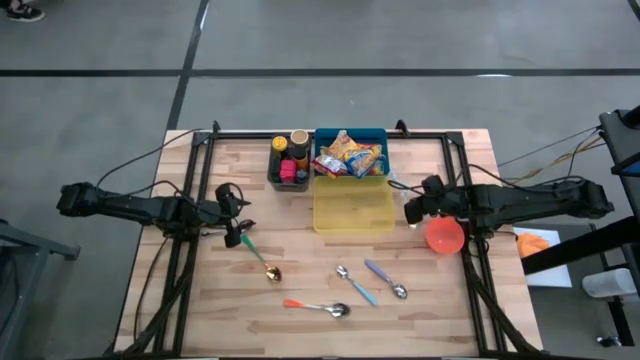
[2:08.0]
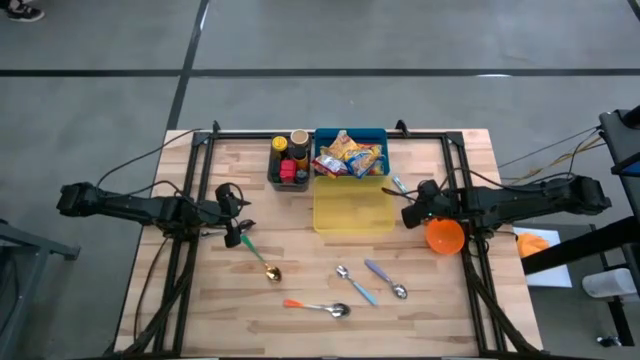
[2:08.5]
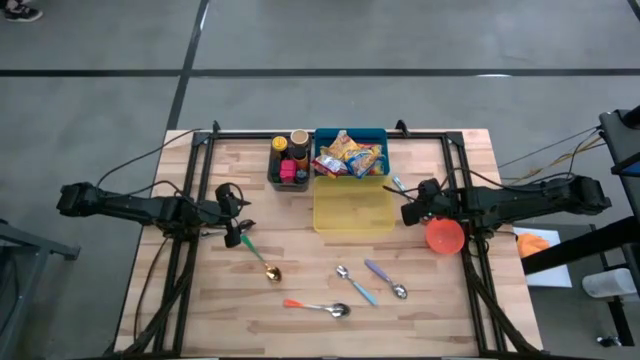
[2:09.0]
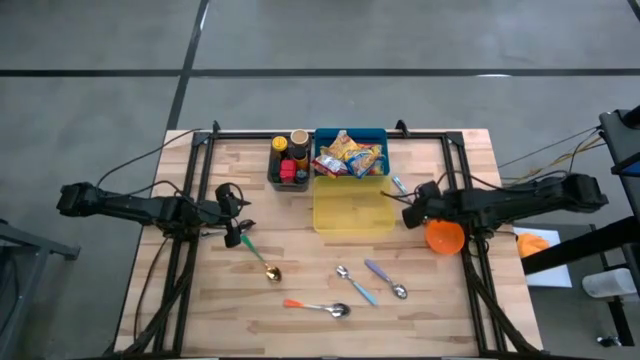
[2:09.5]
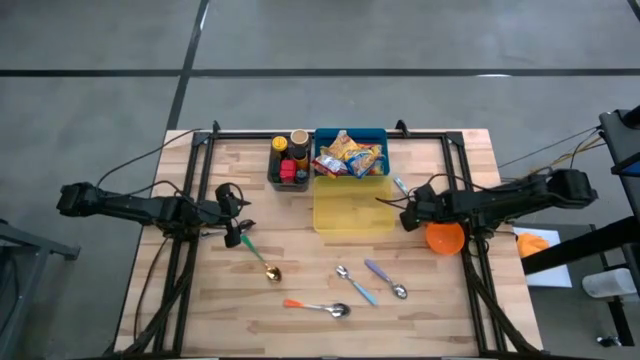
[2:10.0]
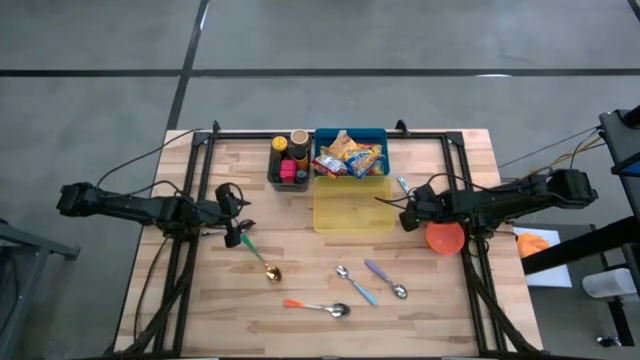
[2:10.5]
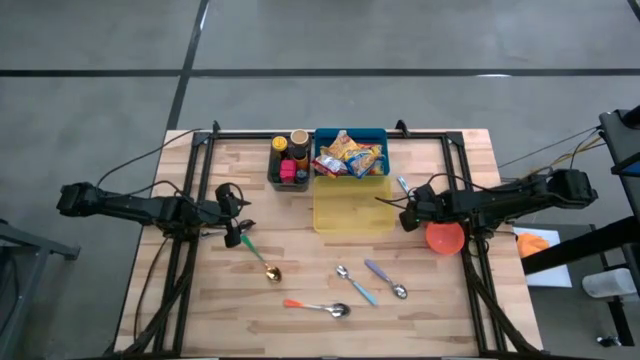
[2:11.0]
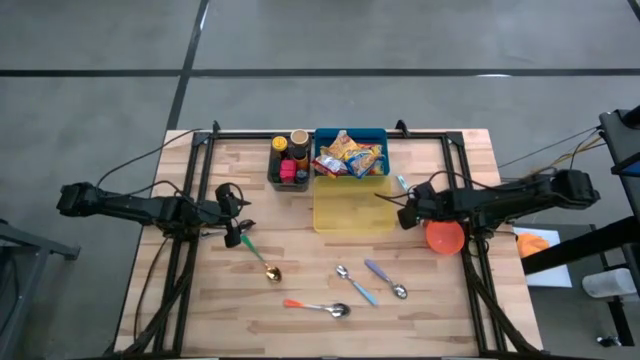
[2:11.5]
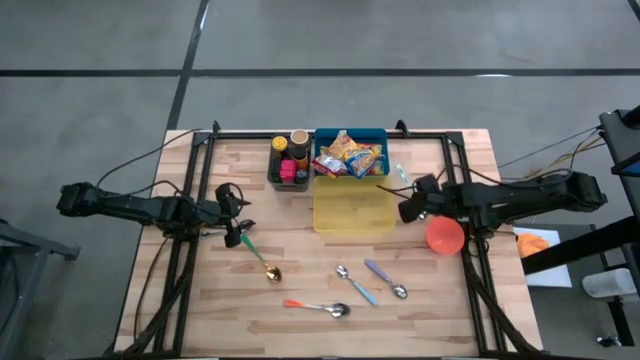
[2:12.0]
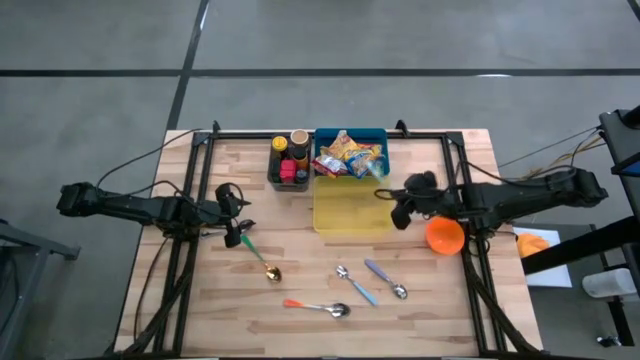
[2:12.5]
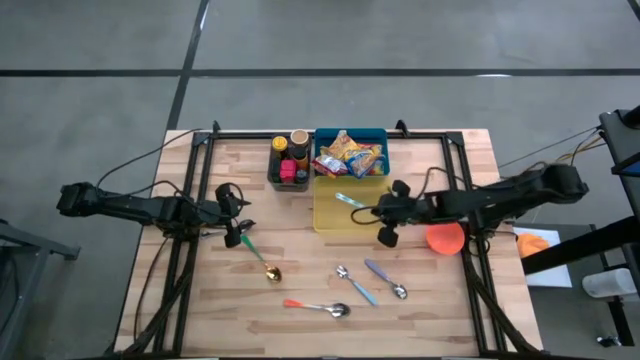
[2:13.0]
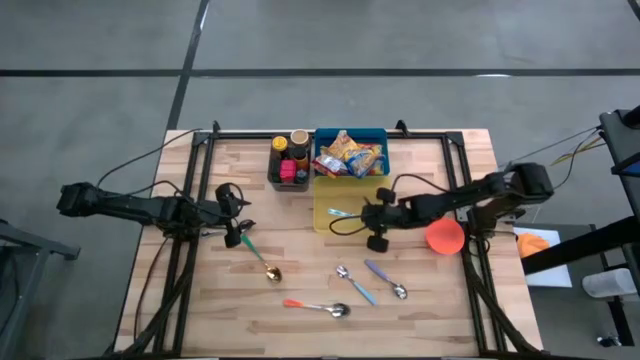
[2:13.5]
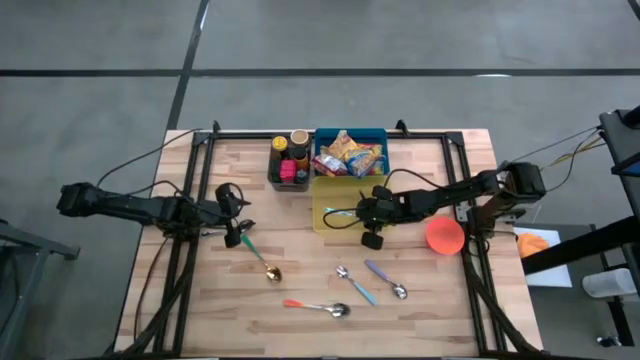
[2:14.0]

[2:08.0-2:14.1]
Put the green patterned spoon into the yellow bin

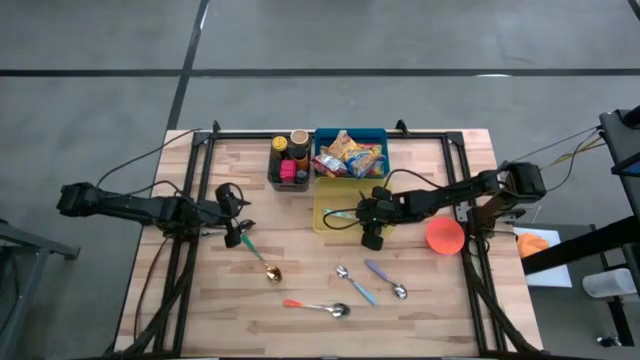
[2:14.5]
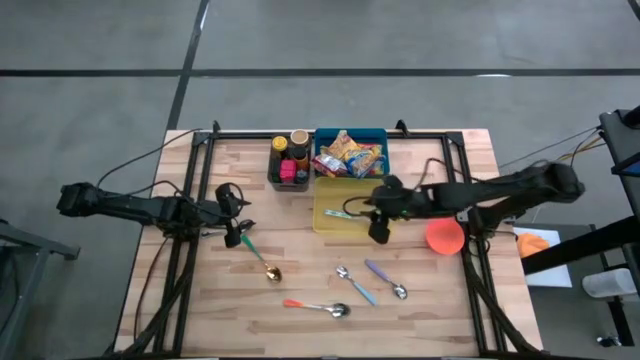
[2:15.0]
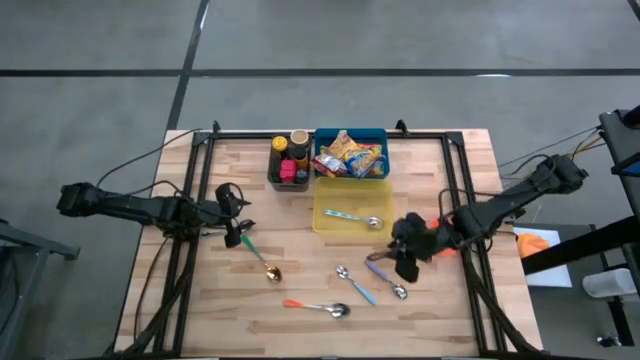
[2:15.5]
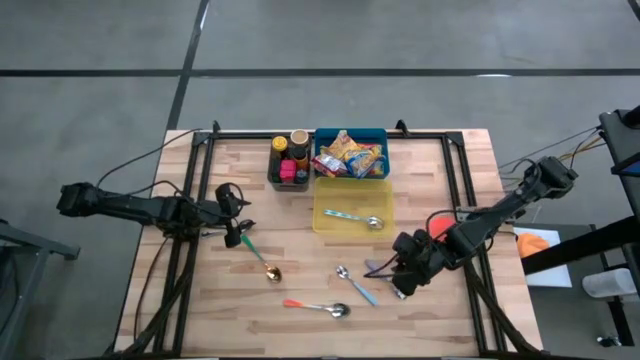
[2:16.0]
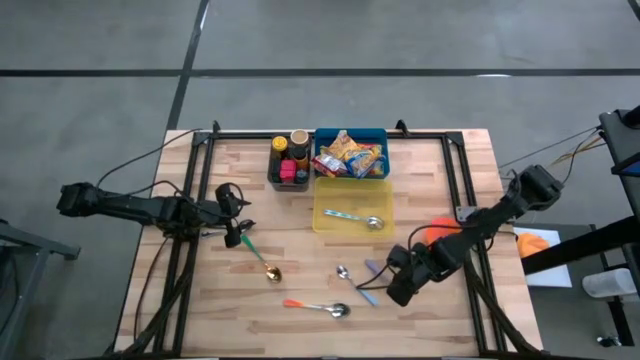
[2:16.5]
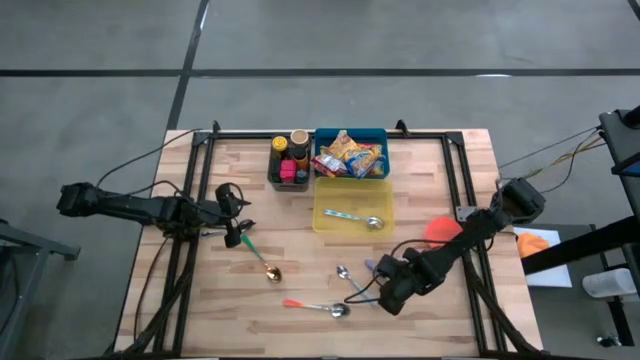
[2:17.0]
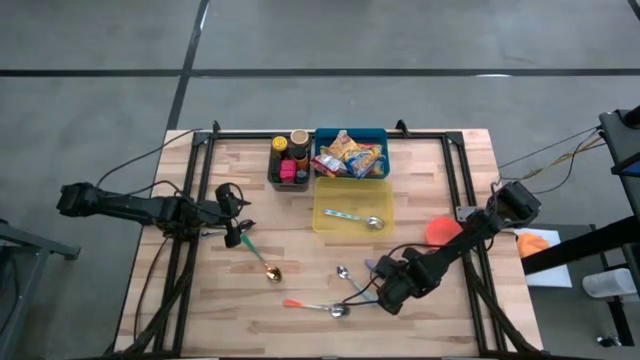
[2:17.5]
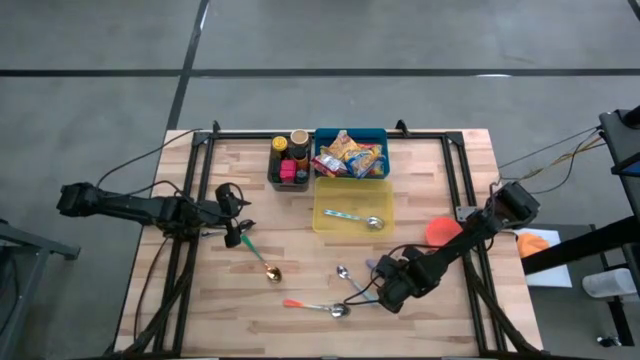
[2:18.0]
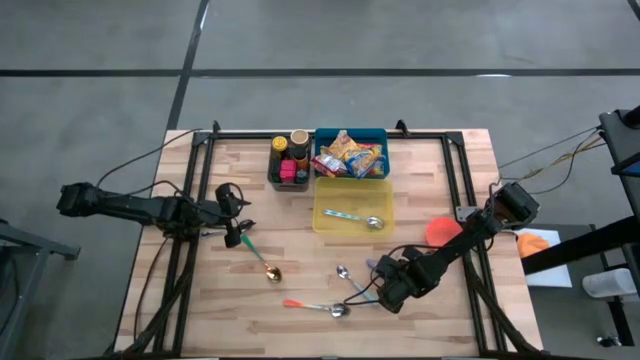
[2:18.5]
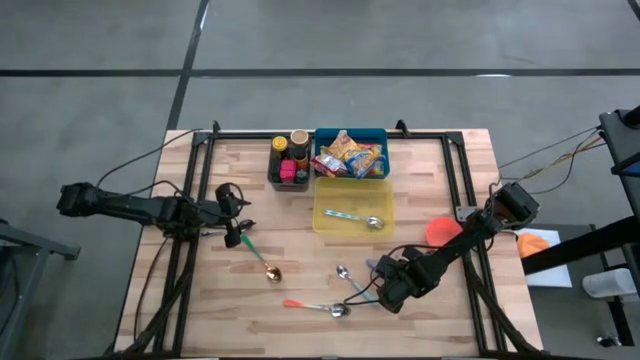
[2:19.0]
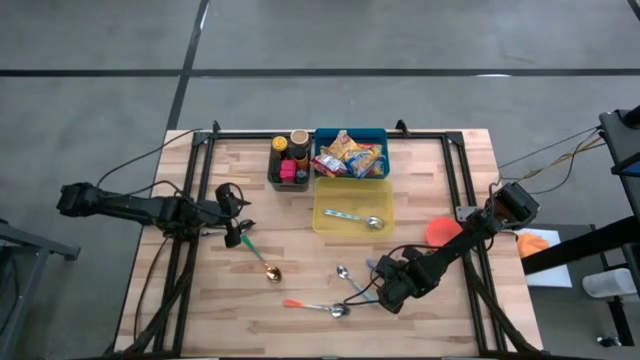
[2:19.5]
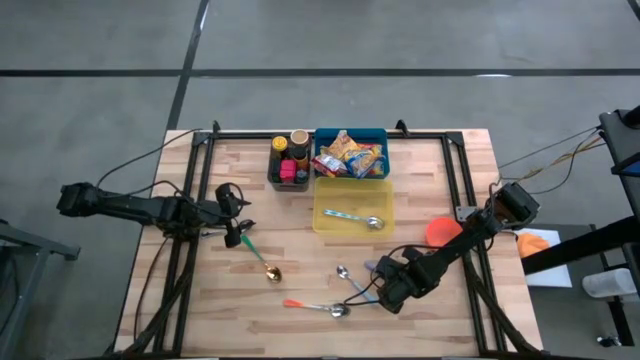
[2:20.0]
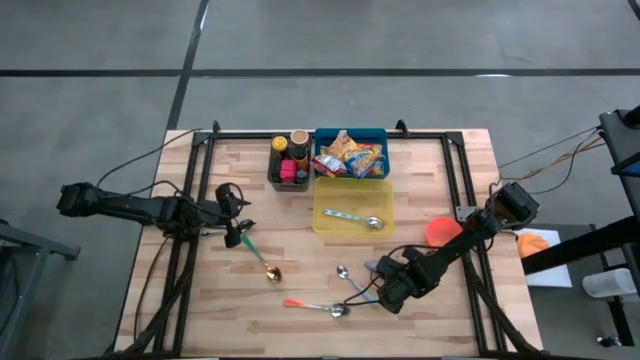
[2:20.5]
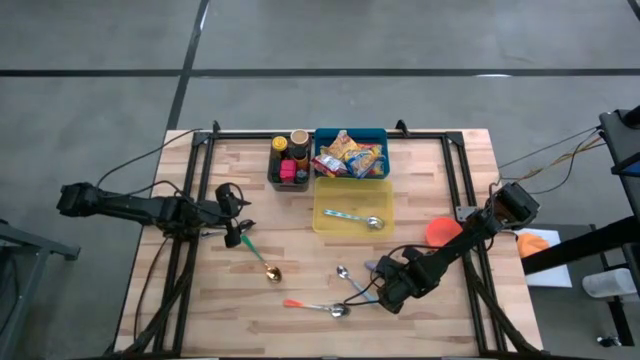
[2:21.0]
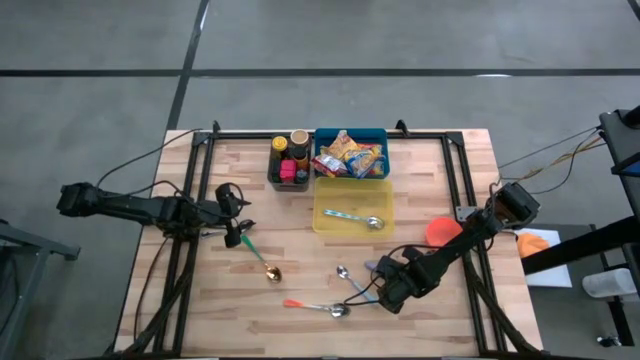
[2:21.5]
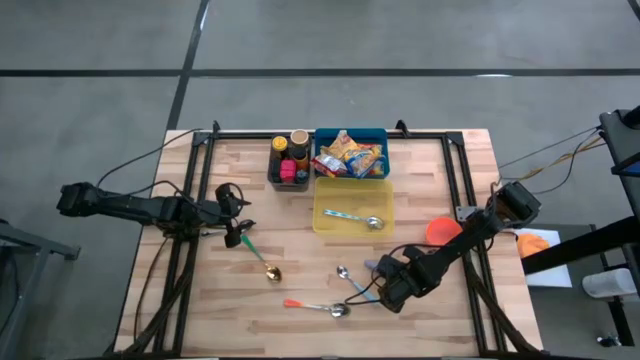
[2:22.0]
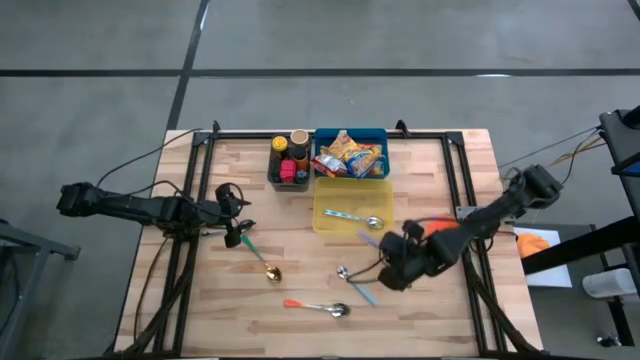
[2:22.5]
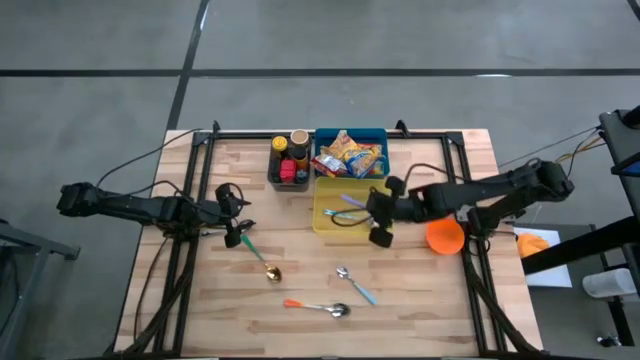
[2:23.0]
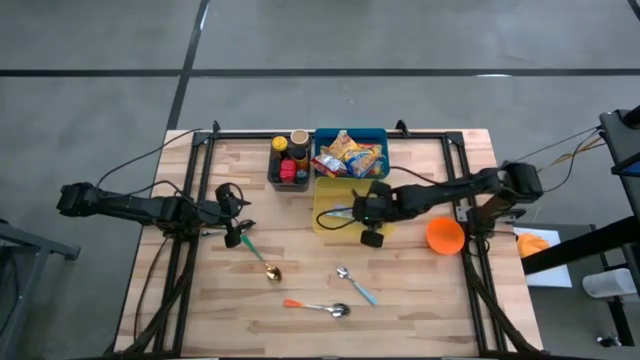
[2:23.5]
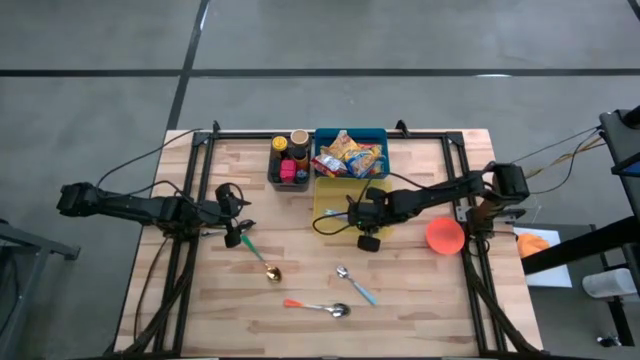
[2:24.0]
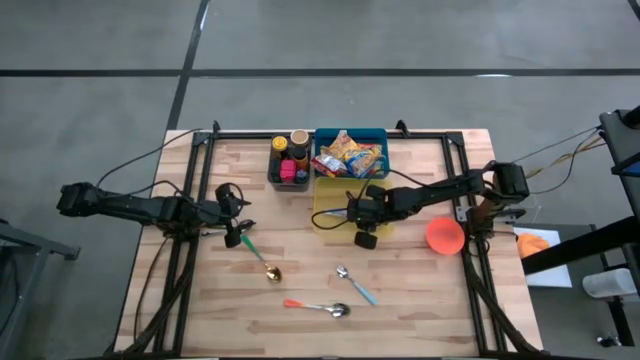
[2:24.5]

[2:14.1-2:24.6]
Put the violet spoon into the yellow bin
